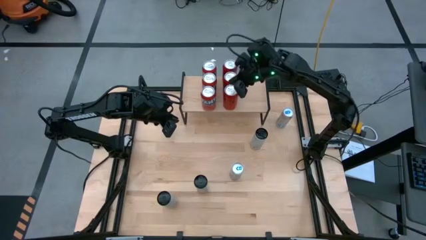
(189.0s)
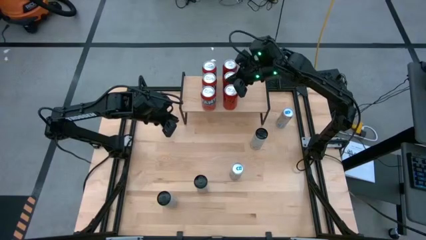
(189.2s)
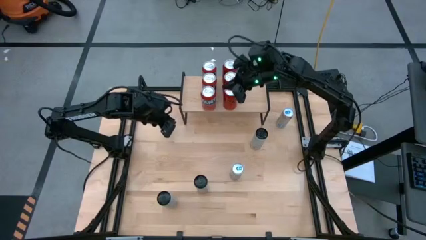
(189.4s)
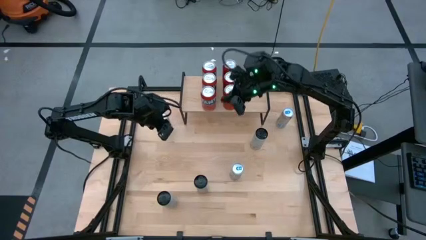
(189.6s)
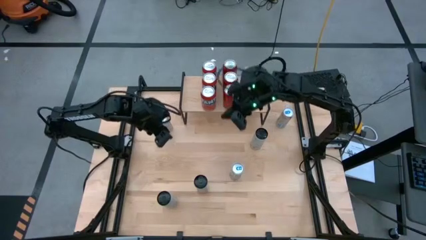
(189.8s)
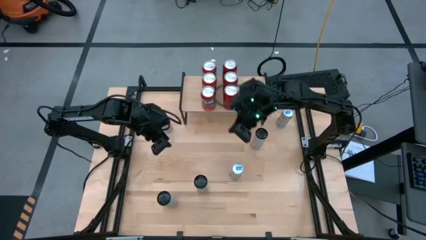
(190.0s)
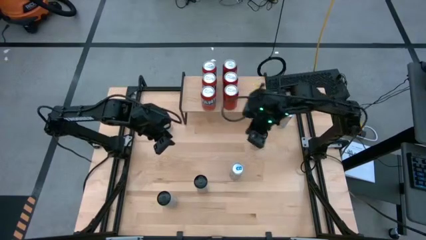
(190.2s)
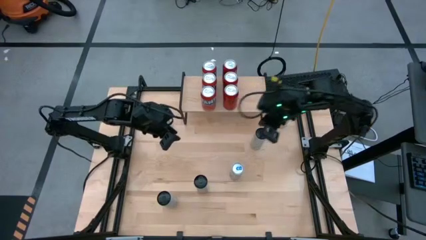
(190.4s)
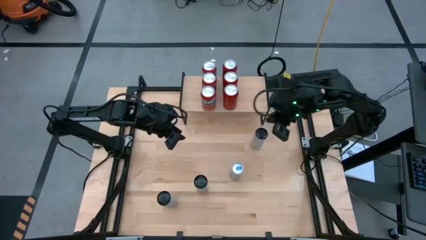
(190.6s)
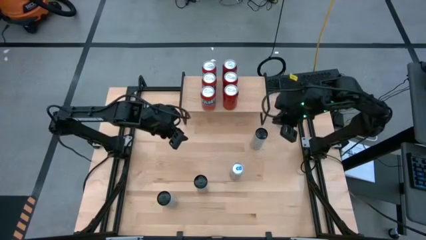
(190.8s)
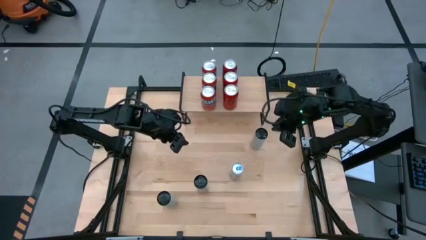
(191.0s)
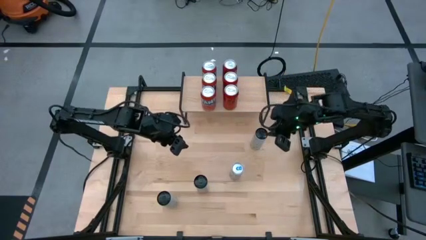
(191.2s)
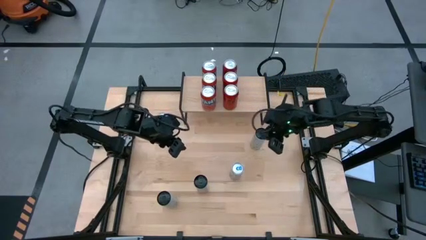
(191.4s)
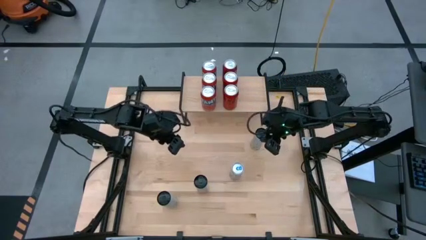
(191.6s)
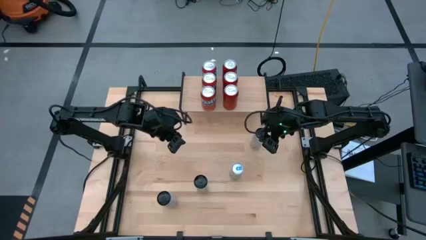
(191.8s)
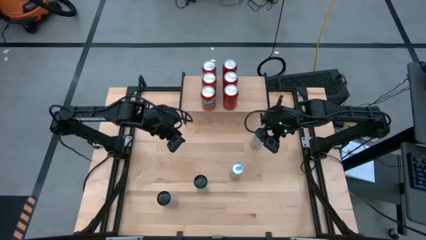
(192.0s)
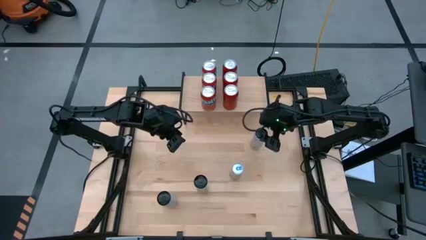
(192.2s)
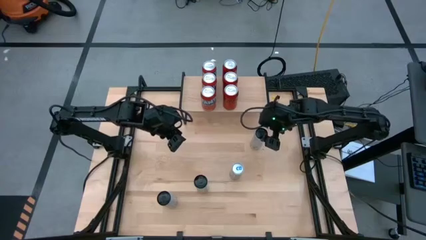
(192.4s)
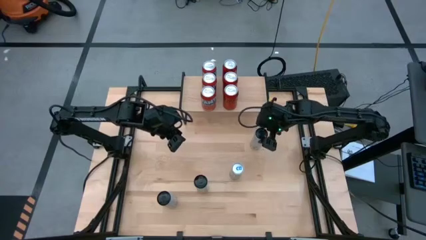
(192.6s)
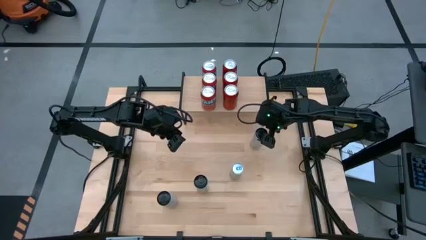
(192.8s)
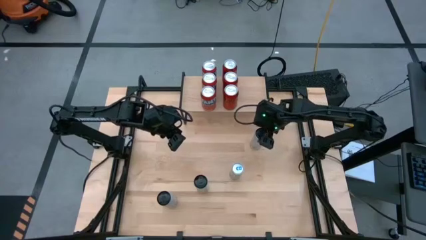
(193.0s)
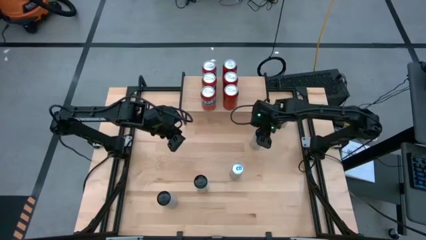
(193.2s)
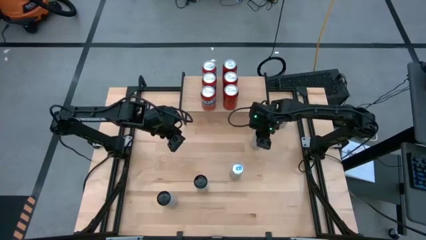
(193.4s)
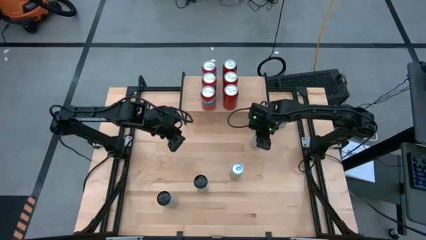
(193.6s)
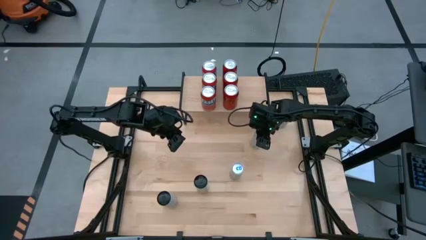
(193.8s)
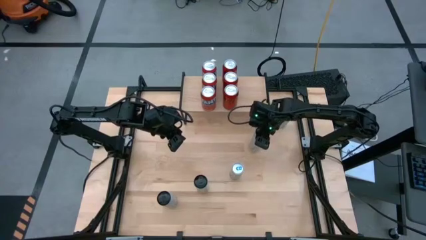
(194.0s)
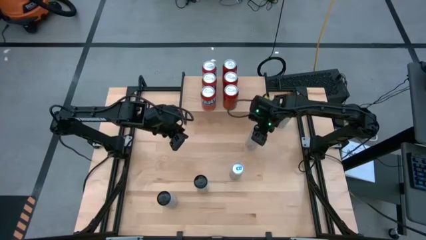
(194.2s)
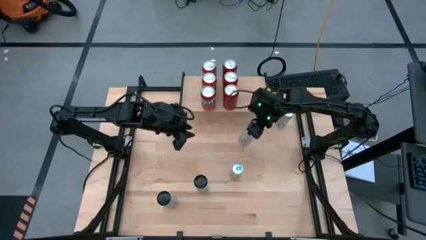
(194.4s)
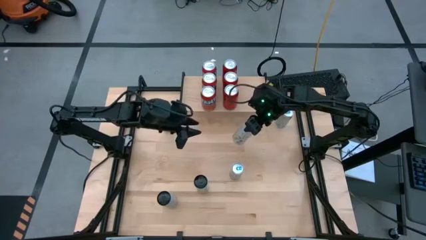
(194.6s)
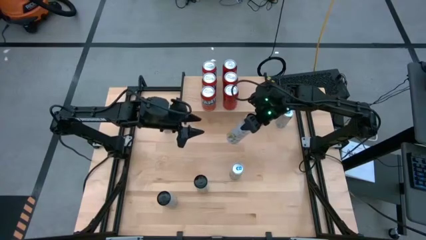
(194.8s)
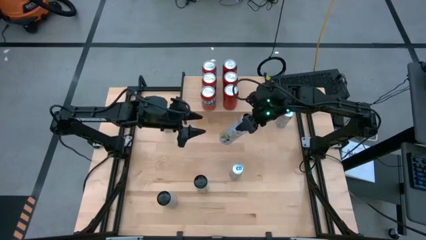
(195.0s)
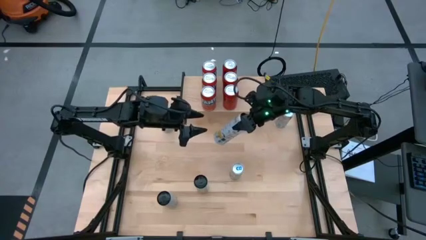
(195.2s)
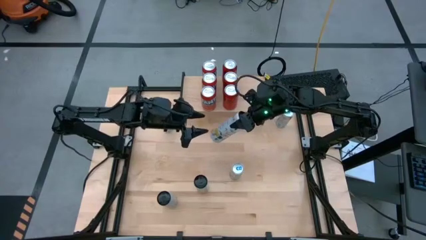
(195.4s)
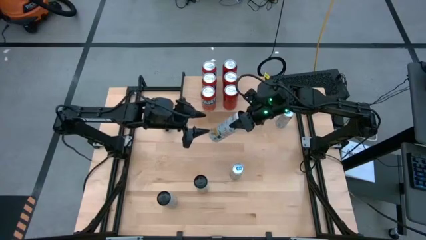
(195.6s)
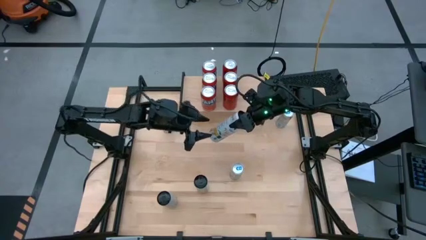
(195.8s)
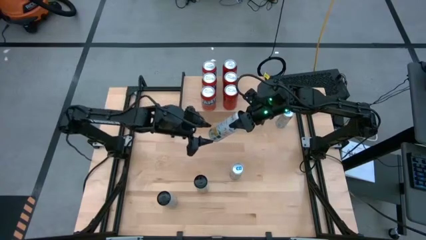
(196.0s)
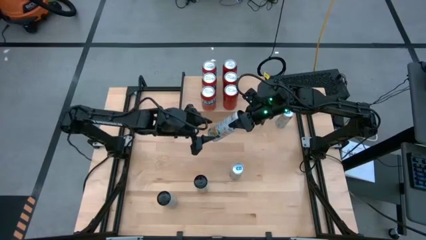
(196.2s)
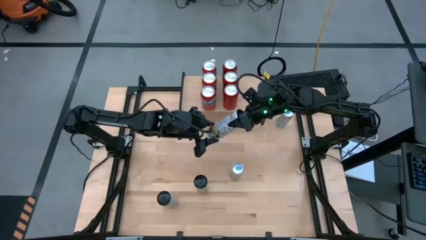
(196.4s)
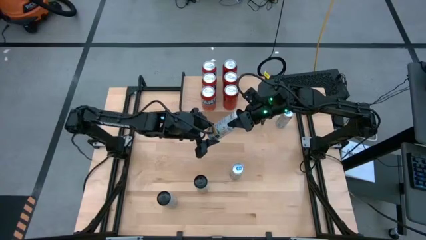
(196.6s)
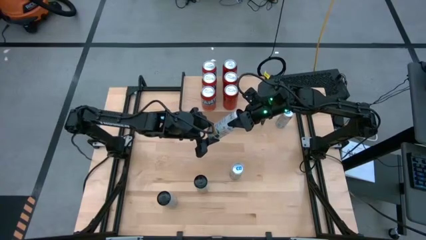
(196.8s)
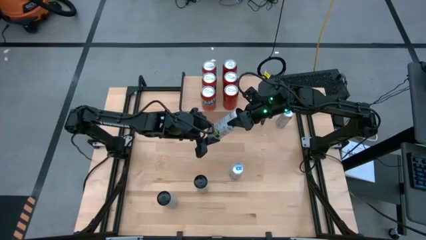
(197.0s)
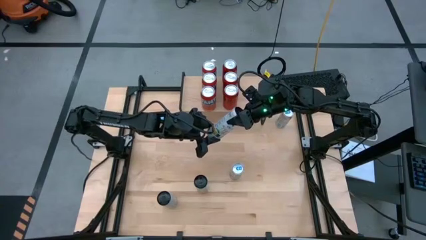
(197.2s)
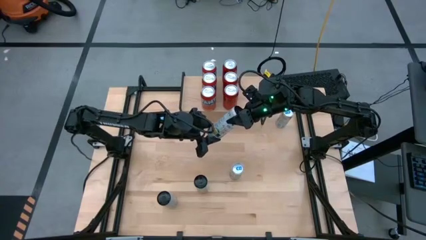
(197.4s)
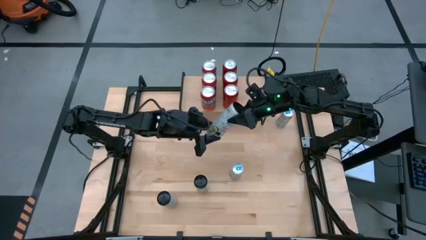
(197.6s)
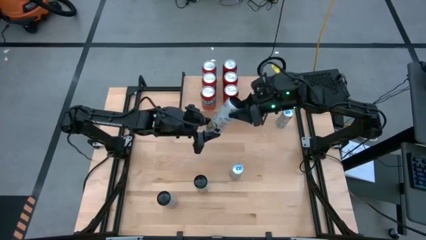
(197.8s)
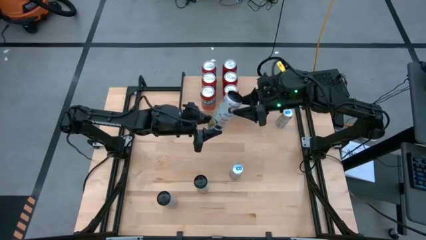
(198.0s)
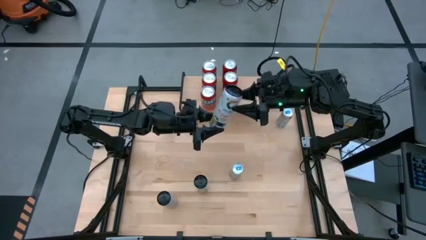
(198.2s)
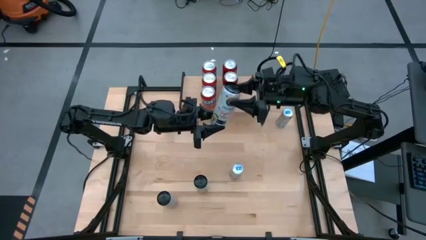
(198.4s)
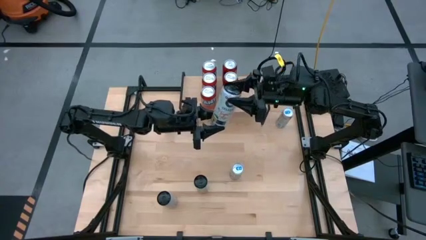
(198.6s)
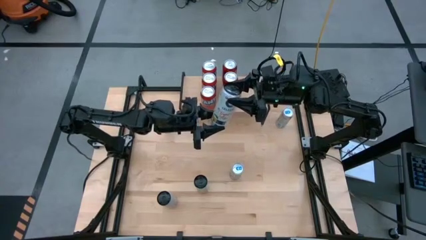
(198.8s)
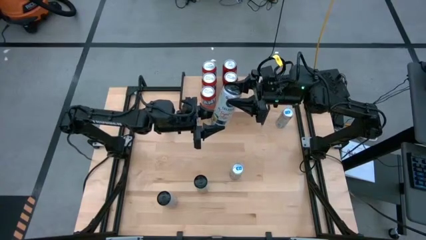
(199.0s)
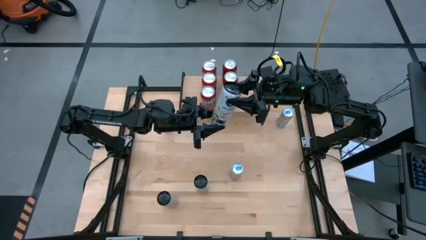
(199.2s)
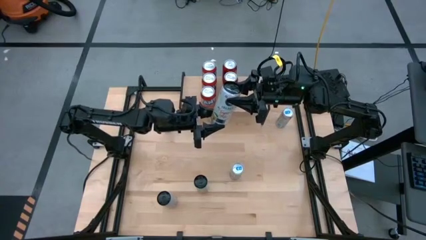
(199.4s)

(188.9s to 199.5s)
Task: Place canned beverage on shelf
Put the top white-yellow soda can on the shelf

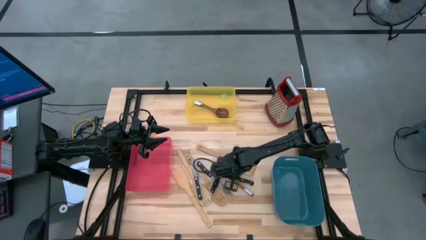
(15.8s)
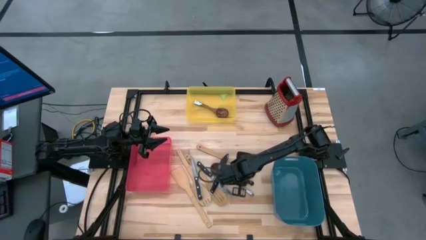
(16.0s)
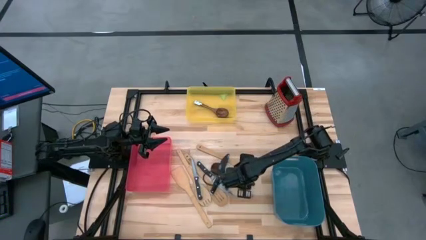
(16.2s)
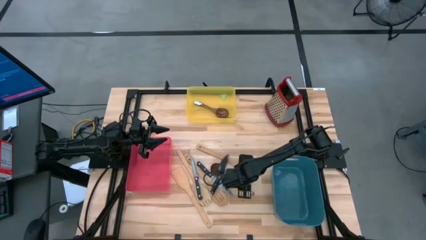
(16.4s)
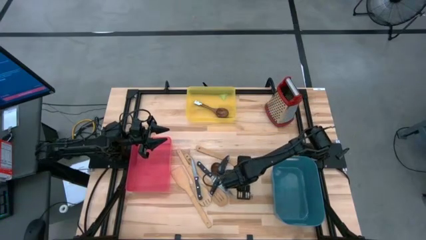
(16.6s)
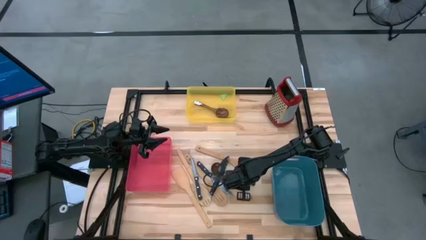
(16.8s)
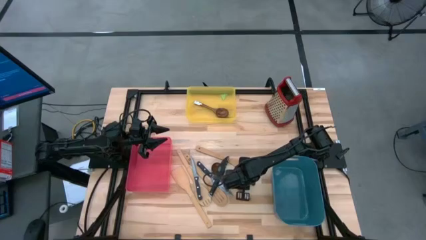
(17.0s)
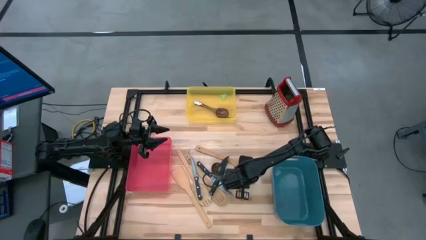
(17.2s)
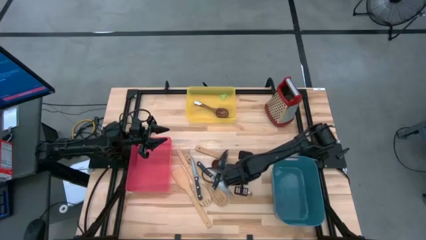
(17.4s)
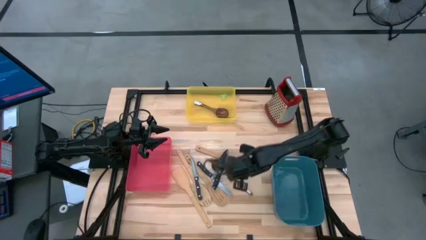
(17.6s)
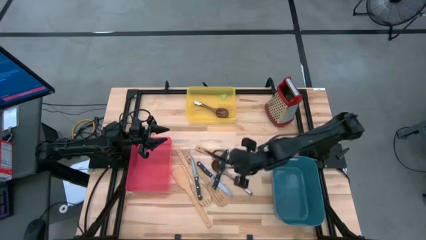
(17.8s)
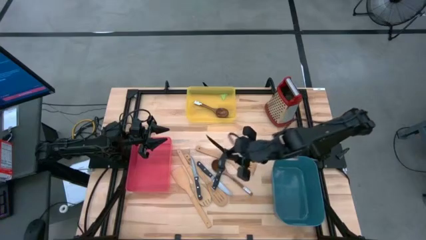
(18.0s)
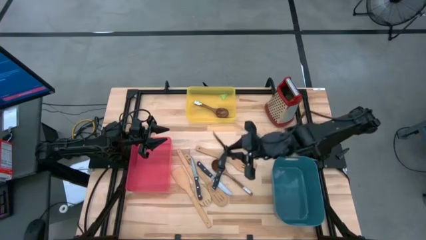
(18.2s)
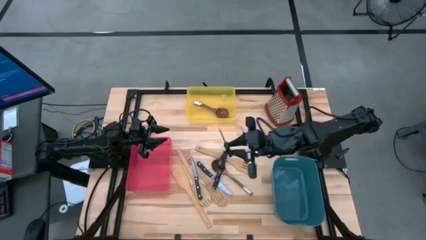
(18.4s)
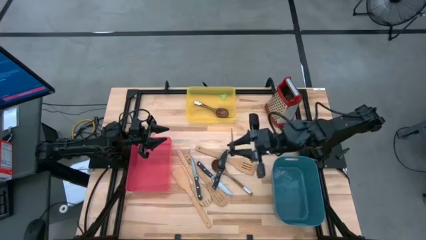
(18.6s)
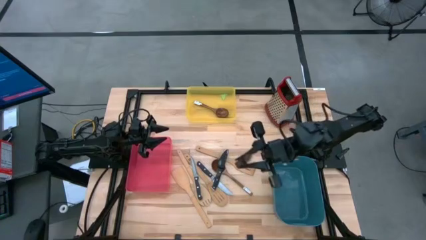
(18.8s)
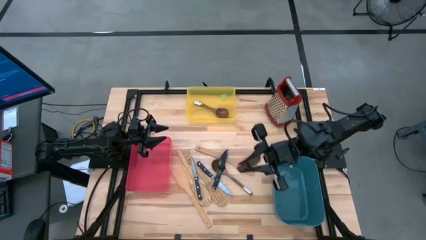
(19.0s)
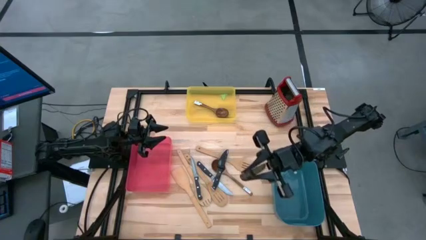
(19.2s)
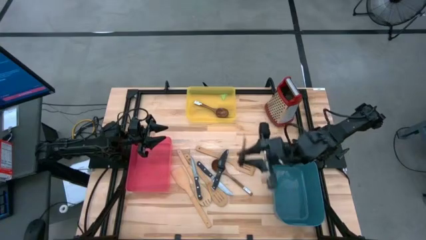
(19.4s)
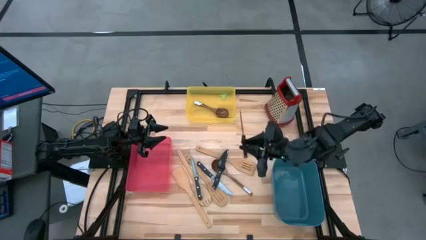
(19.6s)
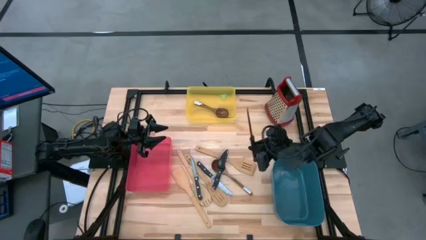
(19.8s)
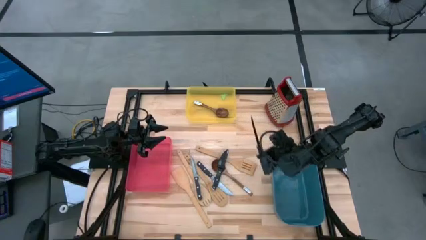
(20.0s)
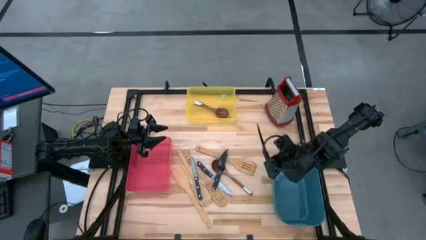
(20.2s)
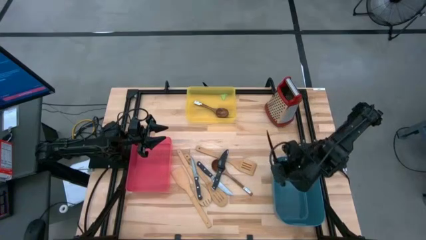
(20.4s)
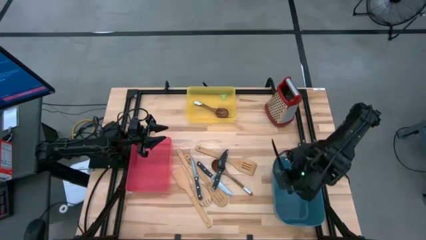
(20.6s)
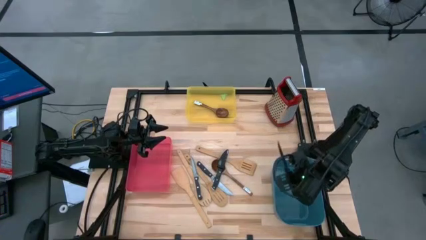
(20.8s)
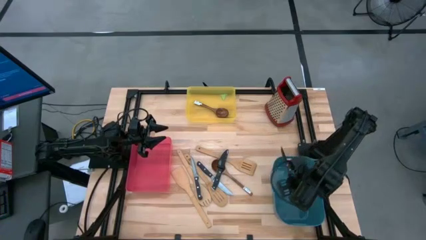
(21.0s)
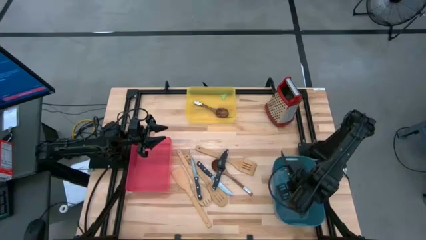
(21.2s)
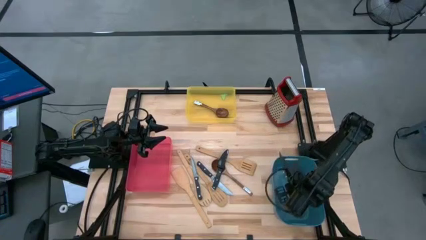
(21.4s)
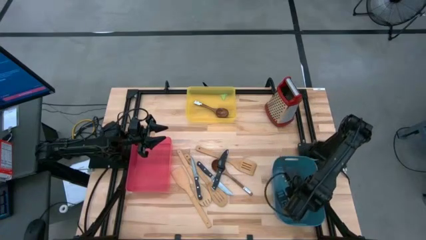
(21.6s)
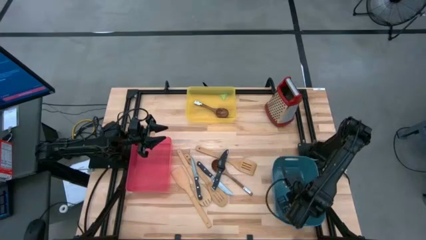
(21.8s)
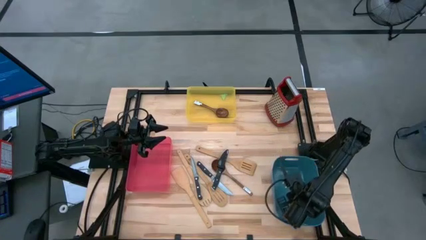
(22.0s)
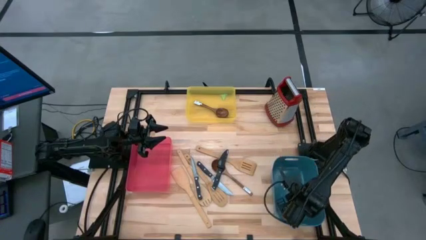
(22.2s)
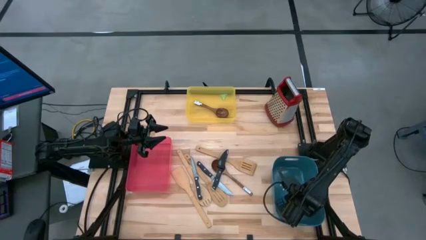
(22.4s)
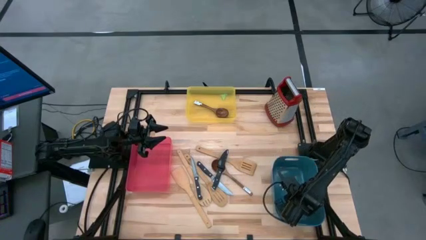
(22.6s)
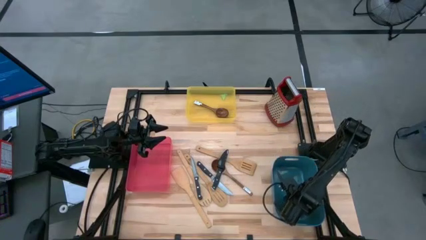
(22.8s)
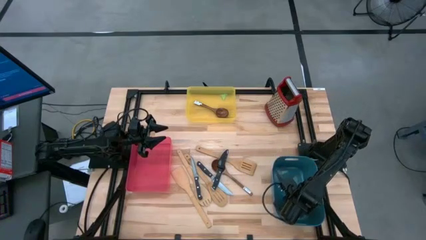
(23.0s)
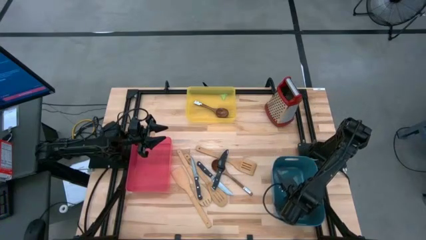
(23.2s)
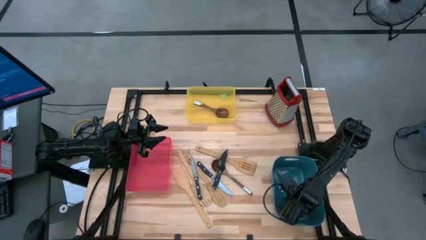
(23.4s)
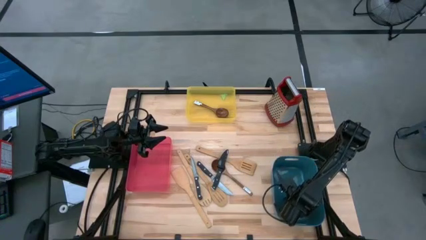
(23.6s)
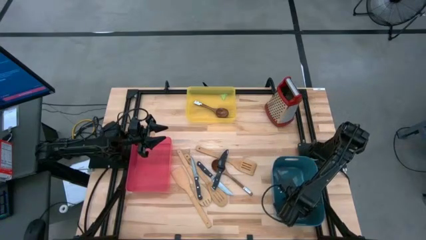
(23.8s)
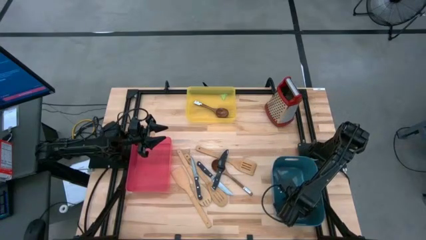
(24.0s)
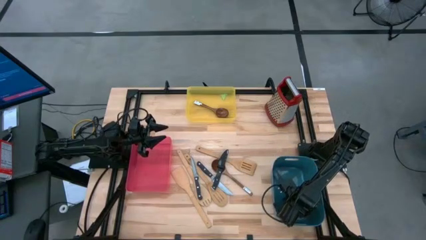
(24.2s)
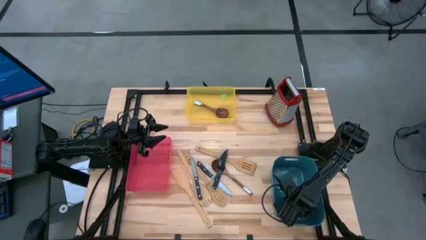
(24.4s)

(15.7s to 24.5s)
Task: Pick & Place Kitchen Items
Put the black knife into the blue bin
